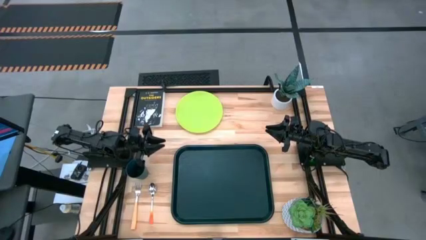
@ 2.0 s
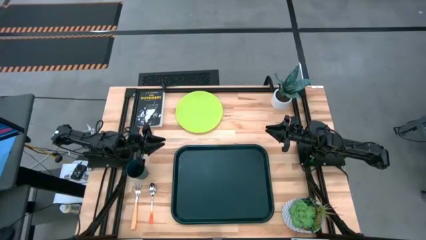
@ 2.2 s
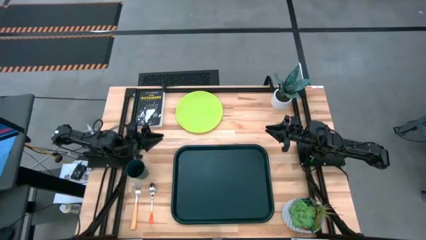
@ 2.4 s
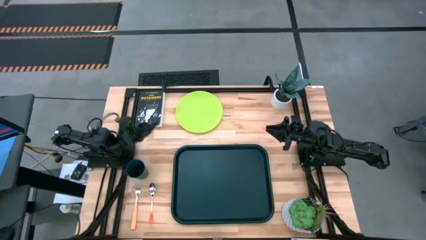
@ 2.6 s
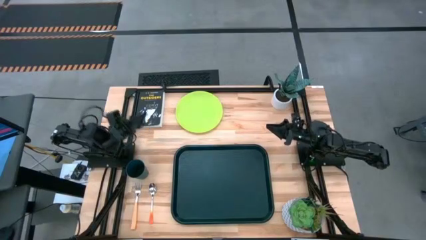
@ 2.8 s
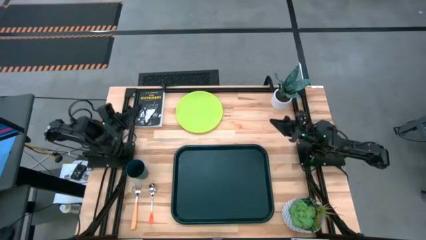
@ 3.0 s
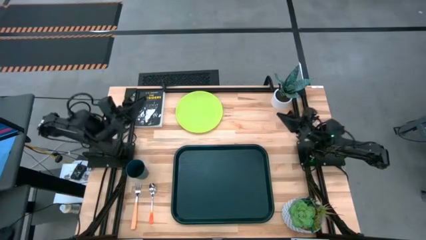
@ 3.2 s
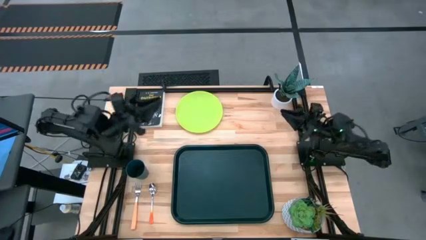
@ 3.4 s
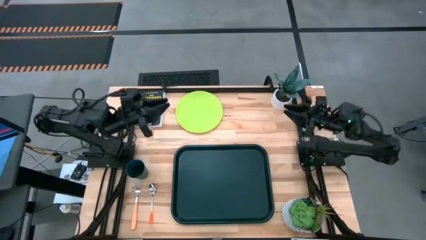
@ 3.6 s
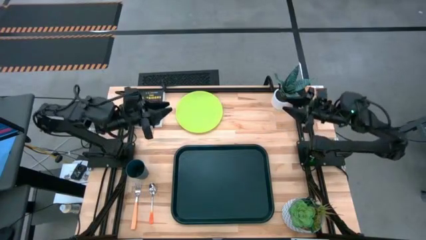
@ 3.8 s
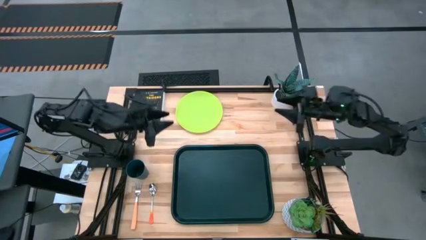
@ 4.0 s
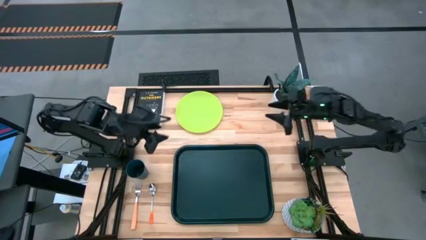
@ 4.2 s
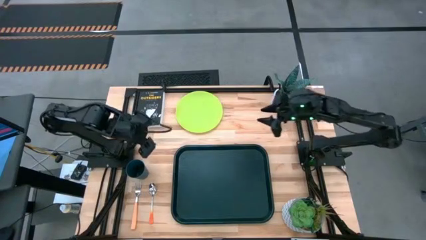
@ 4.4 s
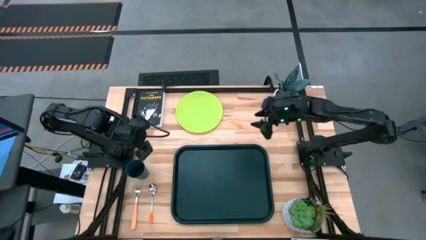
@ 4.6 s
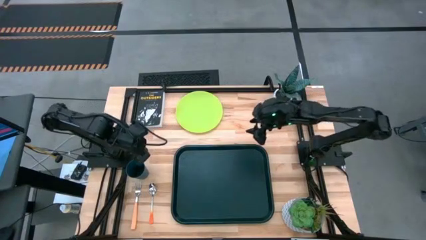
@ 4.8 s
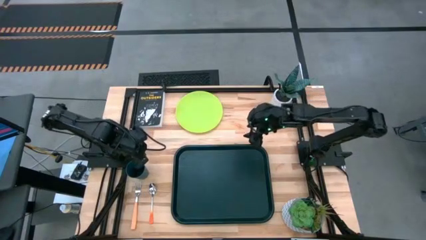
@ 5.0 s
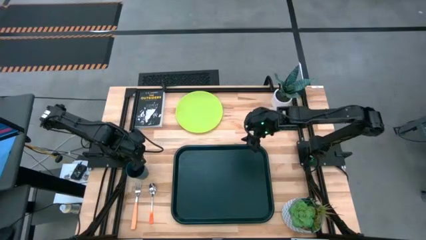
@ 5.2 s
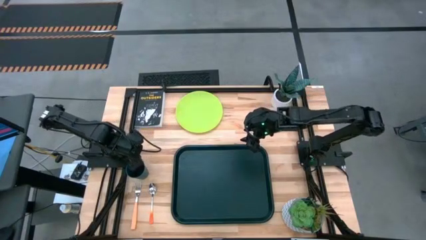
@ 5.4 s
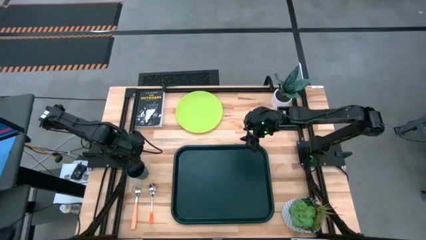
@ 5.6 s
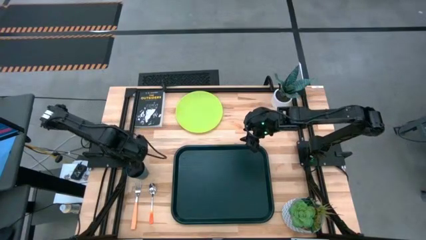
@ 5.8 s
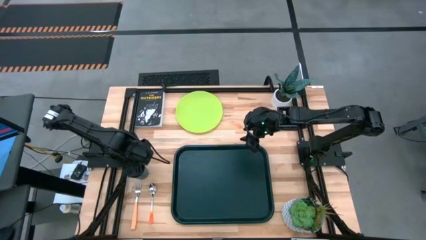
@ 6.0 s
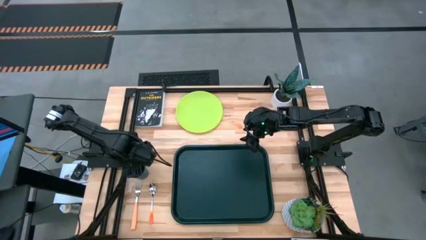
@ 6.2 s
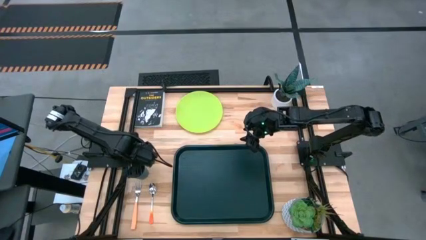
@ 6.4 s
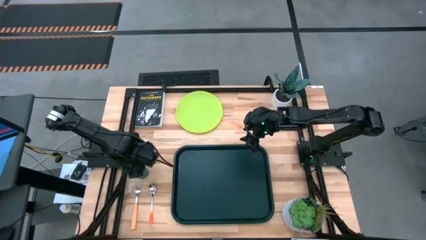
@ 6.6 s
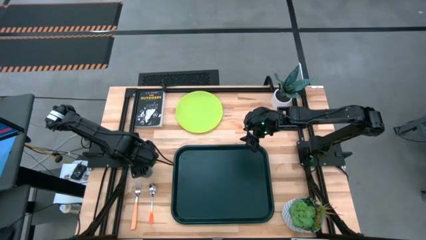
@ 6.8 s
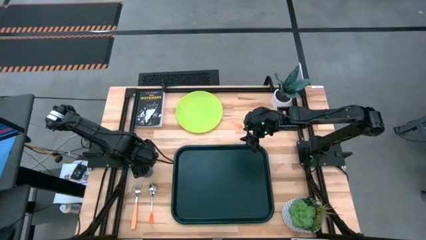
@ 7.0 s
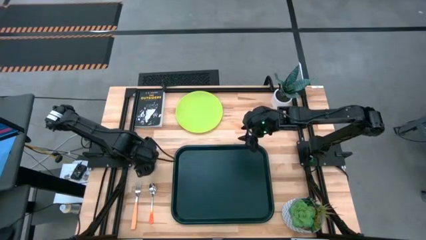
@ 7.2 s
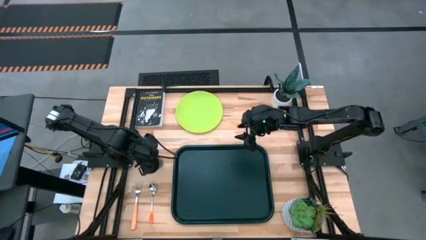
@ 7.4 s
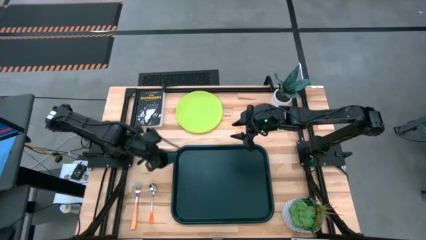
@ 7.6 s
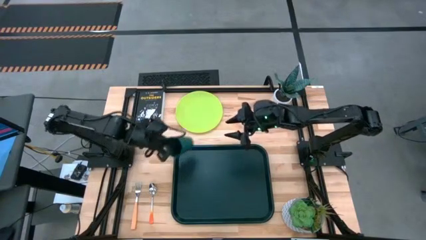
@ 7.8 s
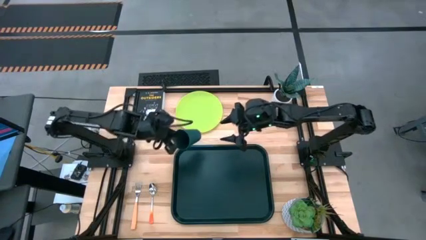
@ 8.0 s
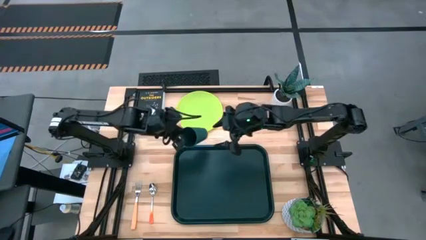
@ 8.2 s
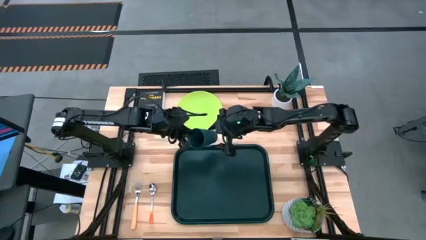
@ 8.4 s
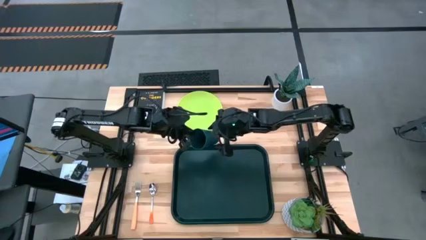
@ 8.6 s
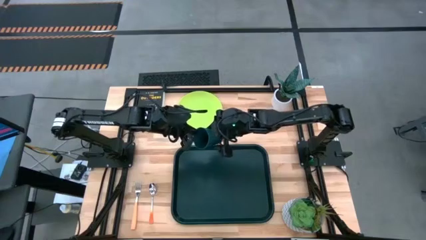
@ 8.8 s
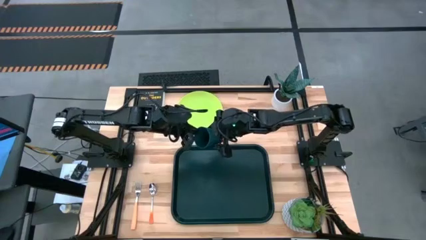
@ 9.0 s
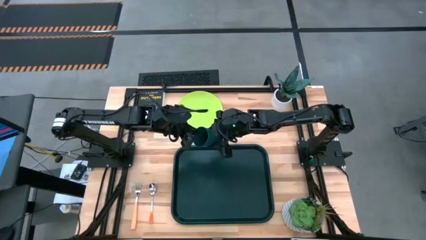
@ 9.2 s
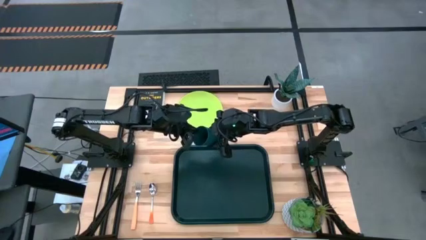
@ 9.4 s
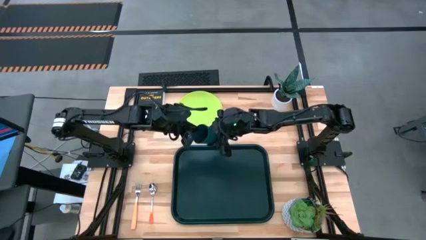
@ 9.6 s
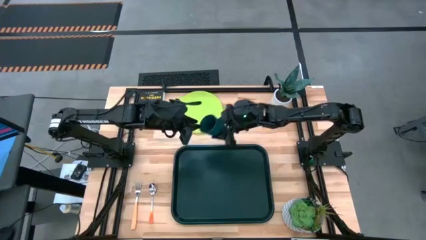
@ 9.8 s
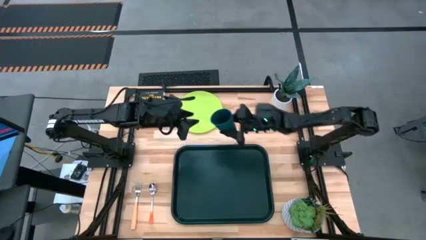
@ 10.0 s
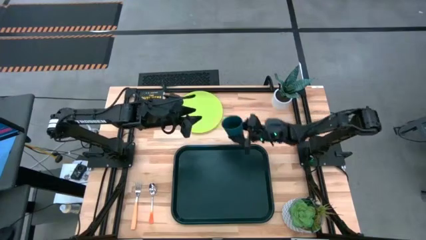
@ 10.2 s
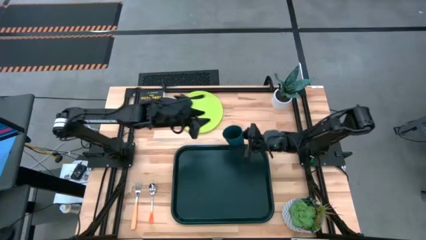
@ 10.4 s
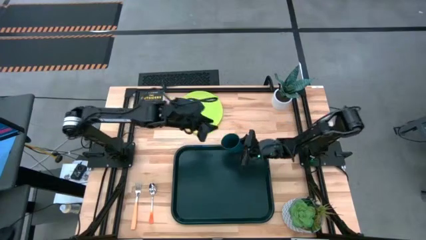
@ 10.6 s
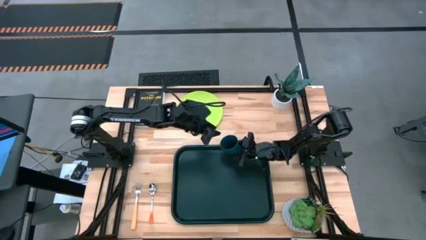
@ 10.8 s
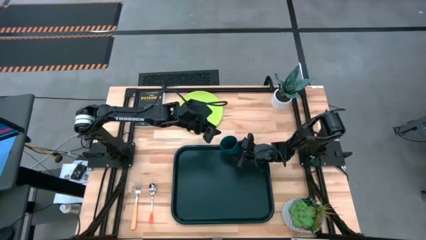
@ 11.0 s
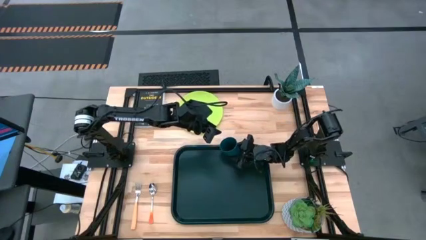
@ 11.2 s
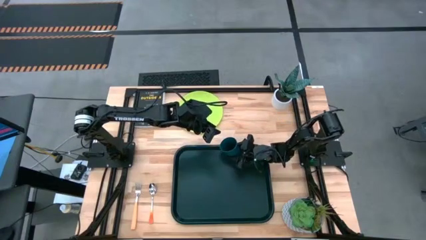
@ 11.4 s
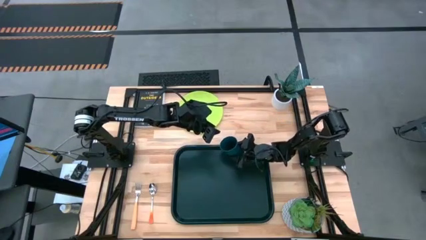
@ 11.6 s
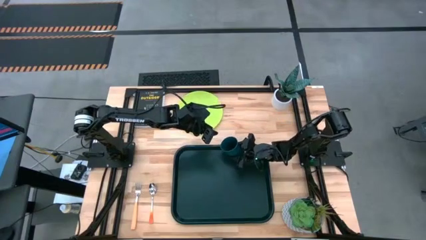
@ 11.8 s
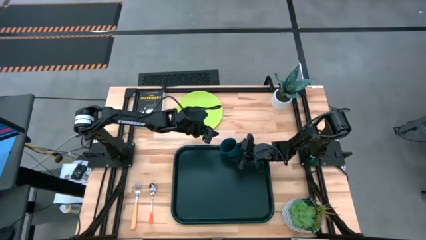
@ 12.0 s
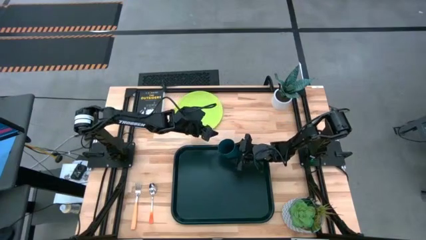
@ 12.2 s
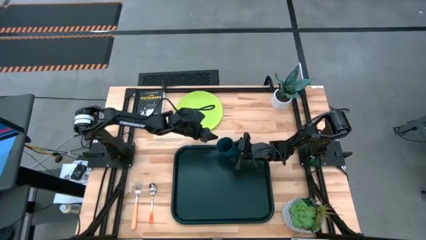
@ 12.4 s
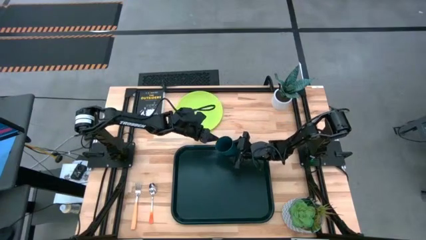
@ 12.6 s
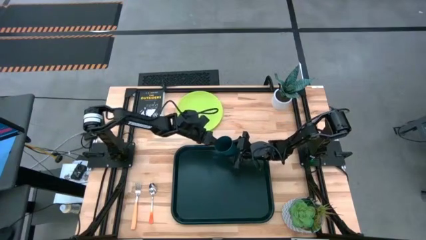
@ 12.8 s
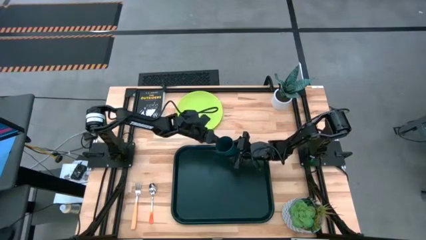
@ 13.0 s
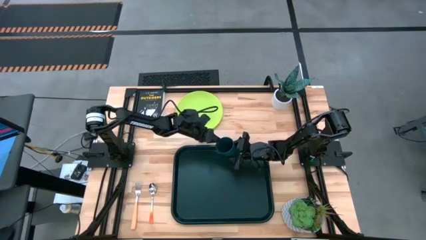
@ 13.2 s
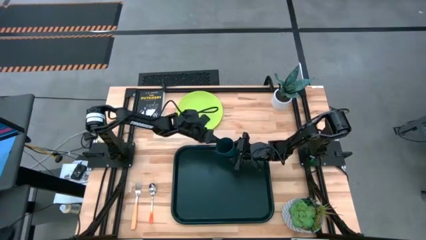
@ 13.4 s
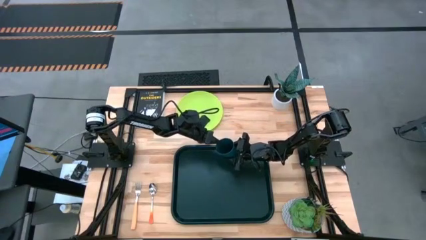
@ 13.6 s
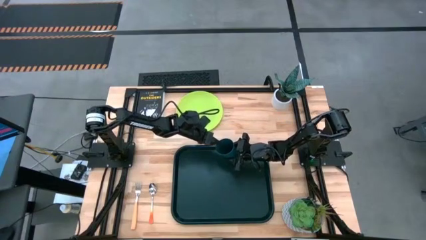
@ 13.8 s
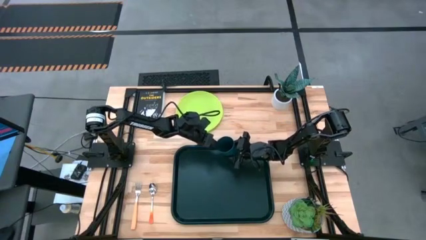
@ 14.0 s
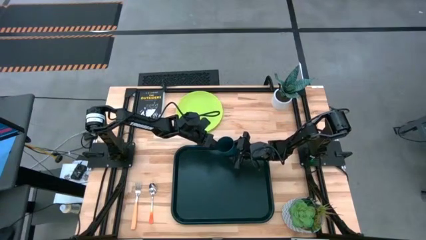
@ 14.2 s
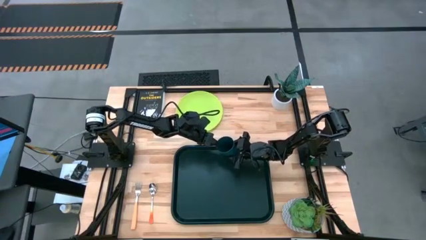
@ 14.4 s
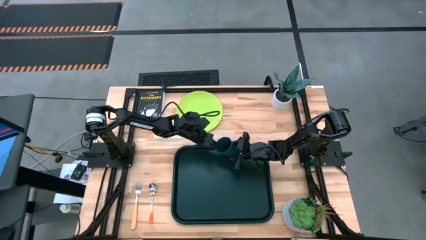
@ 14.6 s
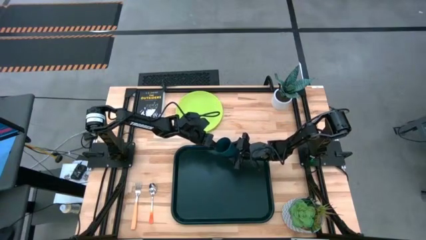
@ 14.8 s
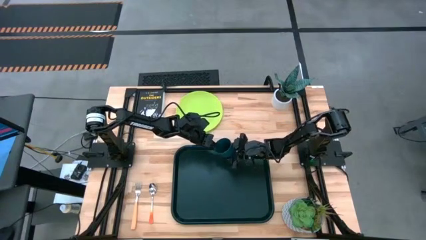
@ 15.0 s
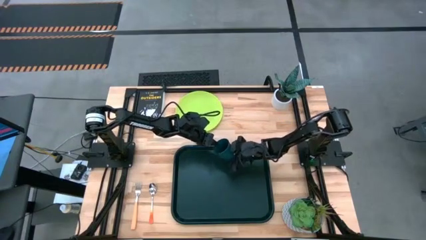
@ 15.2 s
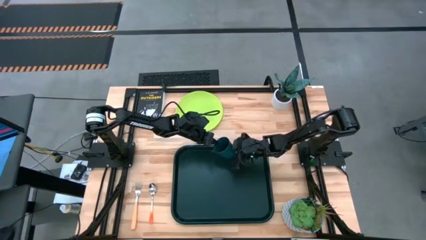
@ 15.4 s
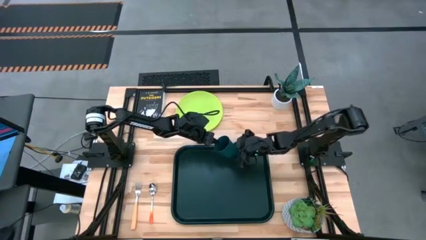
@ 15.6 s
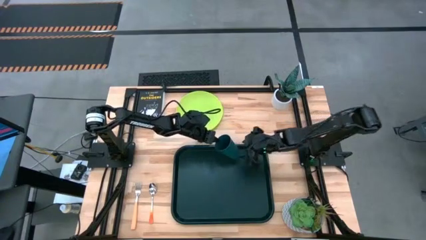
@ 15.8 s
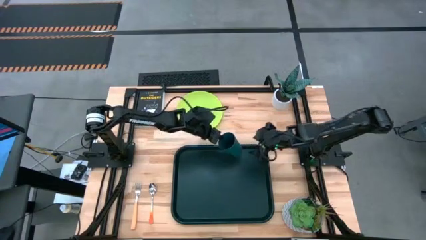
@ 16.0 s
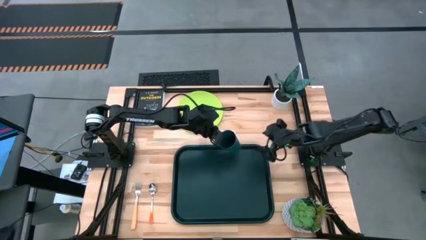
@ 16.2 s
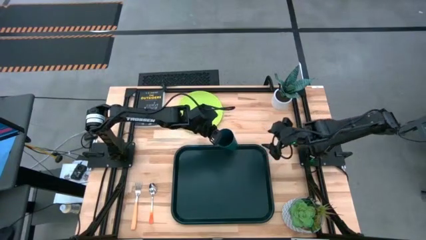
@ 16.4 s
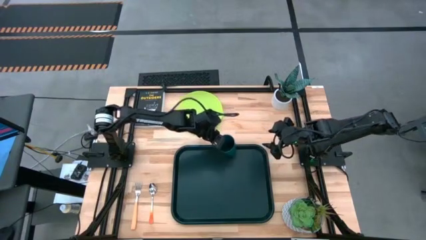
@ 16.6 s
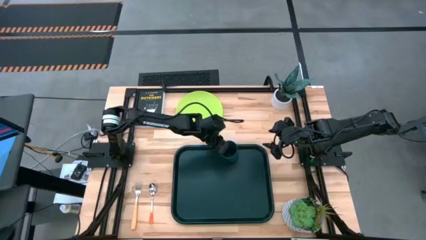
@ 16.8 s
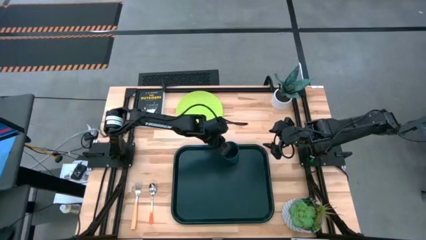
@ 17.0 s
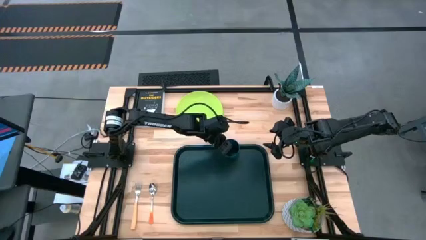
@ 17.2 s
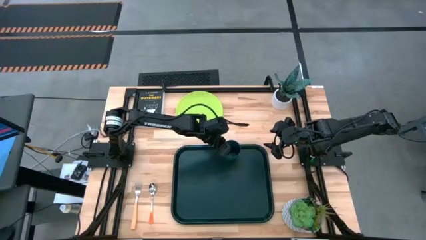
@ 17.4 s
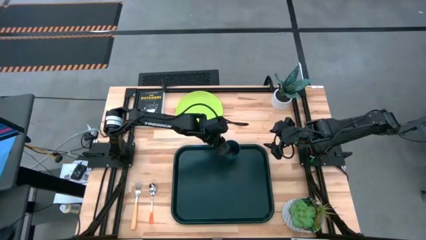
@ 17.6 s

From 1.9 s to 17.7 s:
Task: Pick and place plate/cup/fork/spoon on tray
Put the dark green cup to the top center of the black tray
